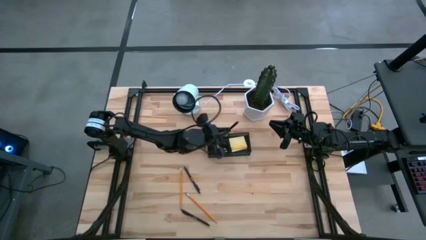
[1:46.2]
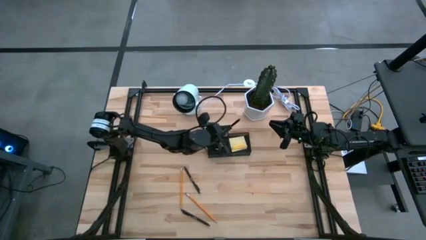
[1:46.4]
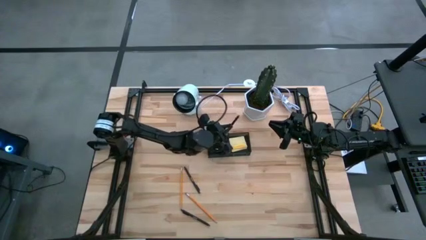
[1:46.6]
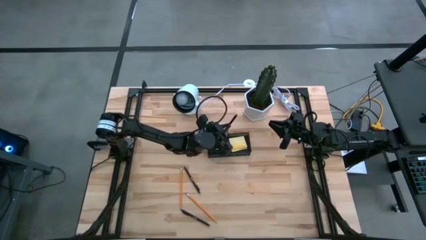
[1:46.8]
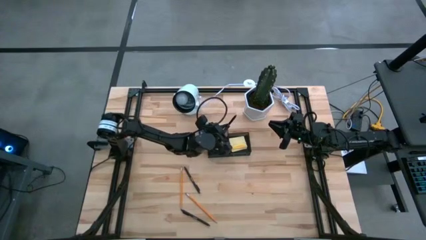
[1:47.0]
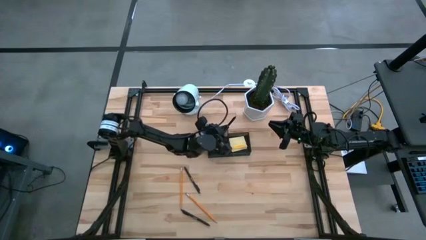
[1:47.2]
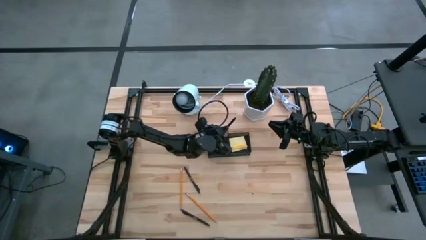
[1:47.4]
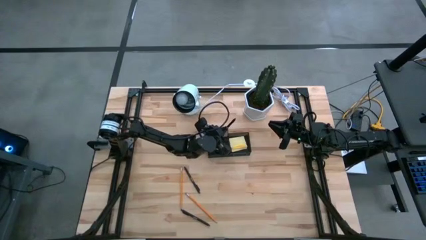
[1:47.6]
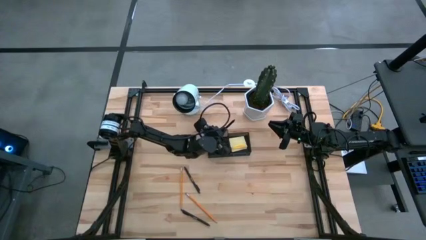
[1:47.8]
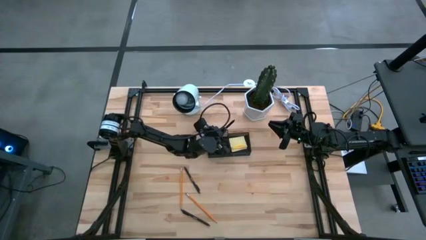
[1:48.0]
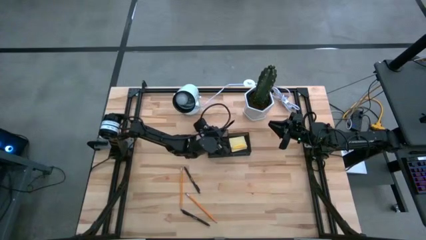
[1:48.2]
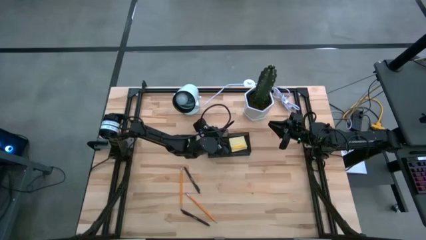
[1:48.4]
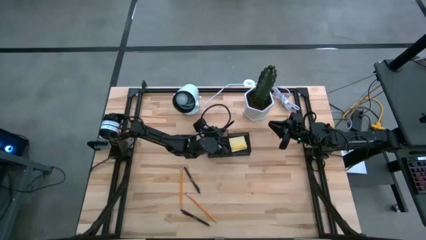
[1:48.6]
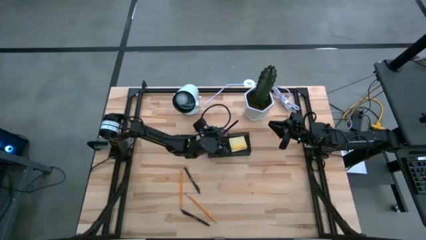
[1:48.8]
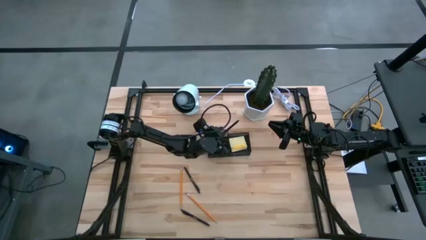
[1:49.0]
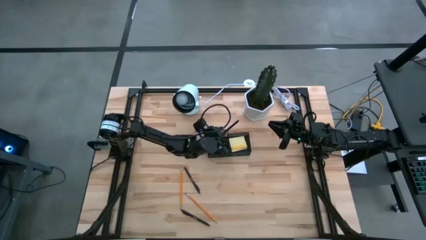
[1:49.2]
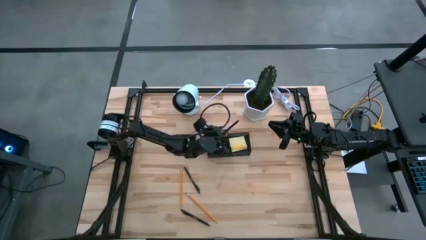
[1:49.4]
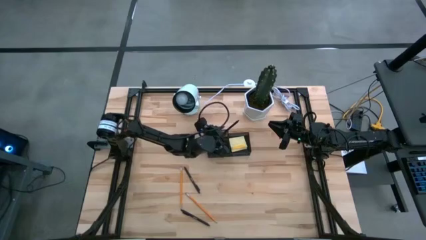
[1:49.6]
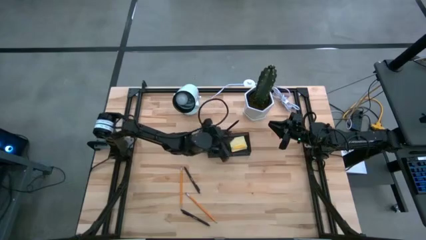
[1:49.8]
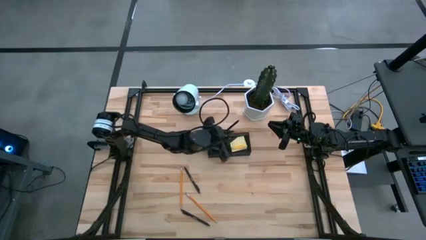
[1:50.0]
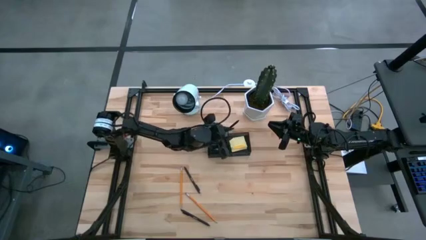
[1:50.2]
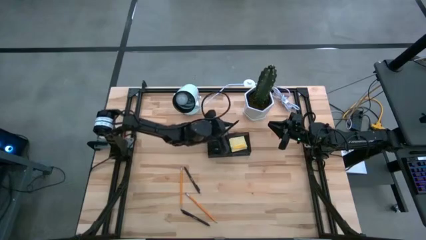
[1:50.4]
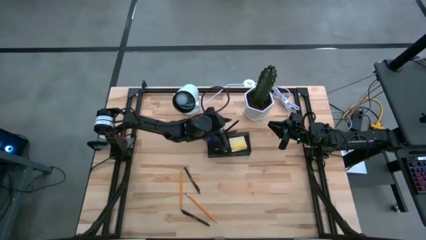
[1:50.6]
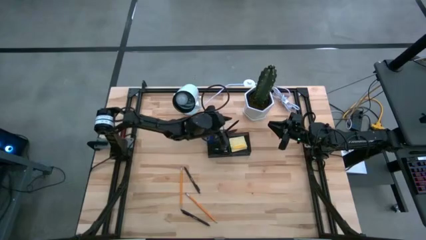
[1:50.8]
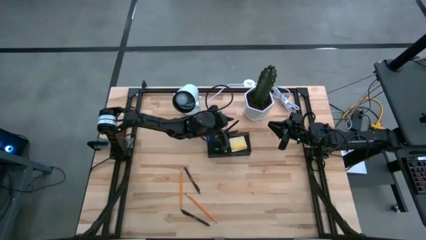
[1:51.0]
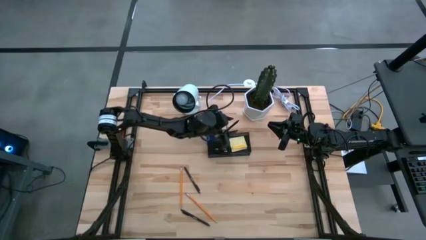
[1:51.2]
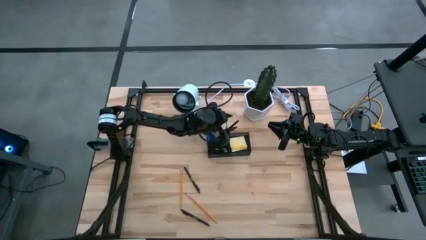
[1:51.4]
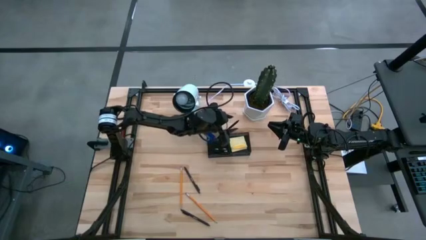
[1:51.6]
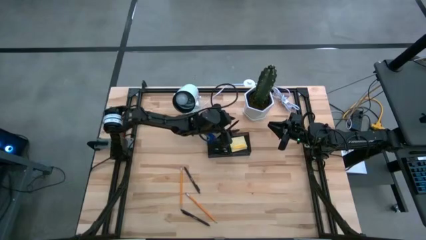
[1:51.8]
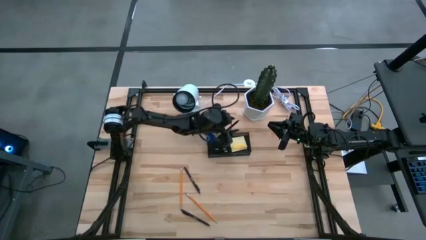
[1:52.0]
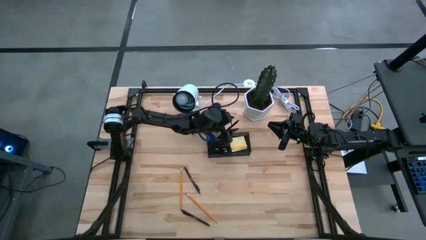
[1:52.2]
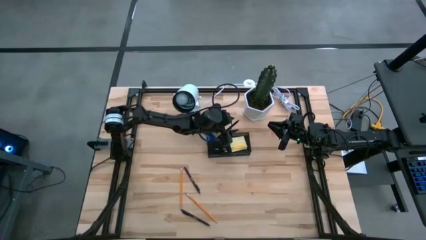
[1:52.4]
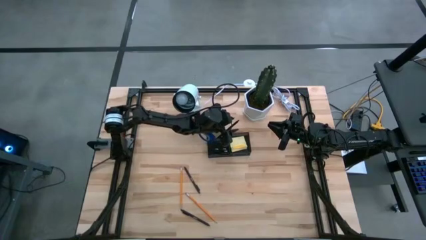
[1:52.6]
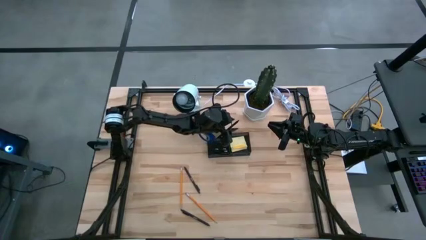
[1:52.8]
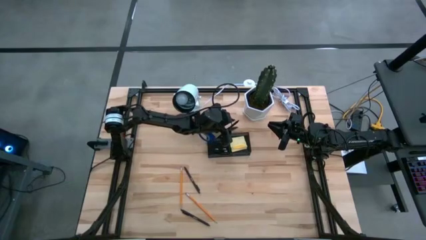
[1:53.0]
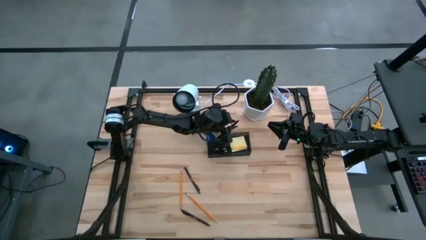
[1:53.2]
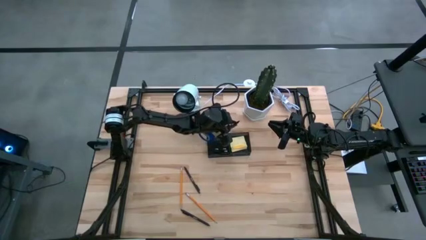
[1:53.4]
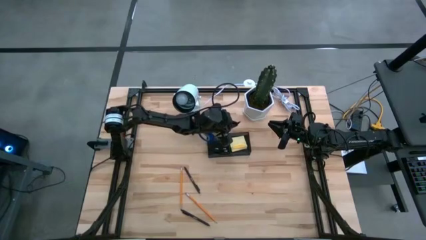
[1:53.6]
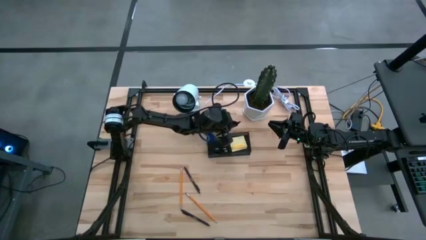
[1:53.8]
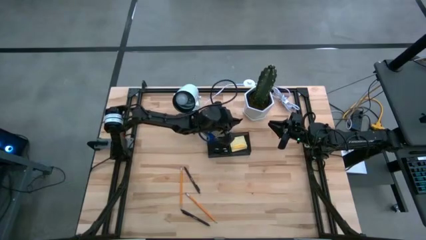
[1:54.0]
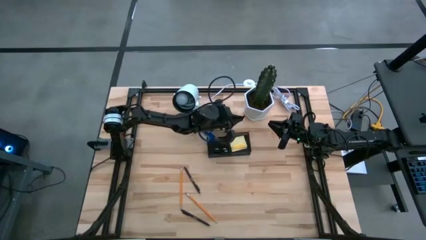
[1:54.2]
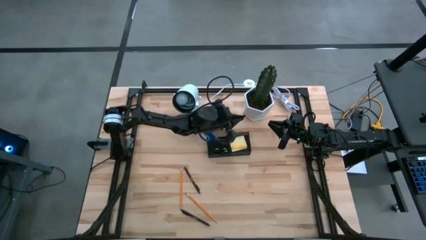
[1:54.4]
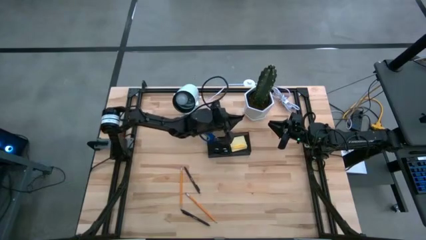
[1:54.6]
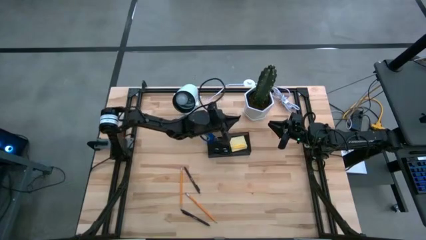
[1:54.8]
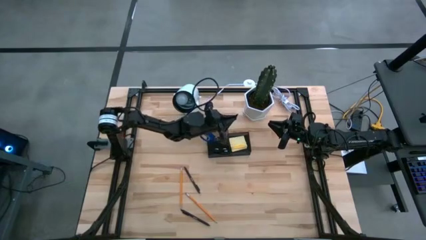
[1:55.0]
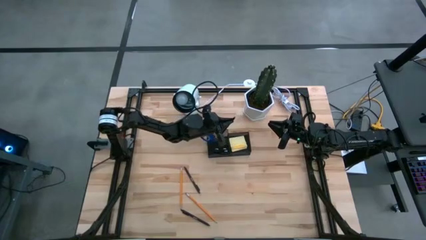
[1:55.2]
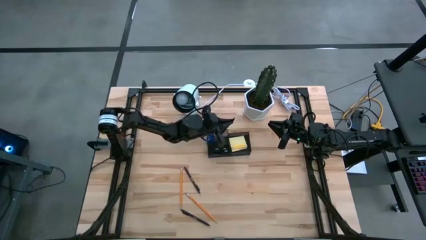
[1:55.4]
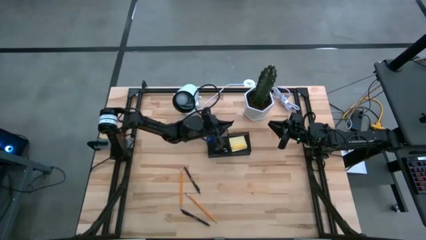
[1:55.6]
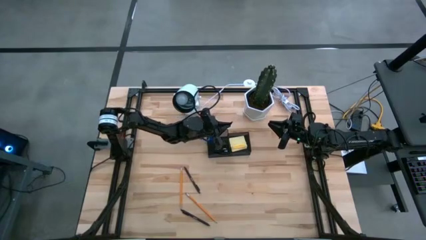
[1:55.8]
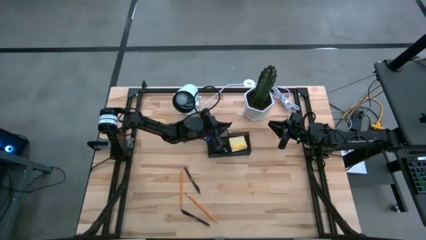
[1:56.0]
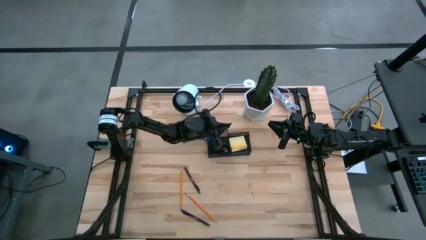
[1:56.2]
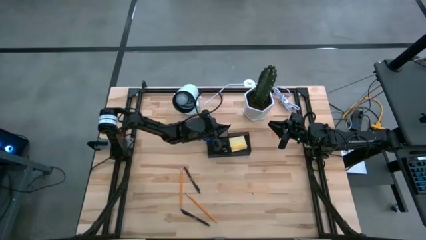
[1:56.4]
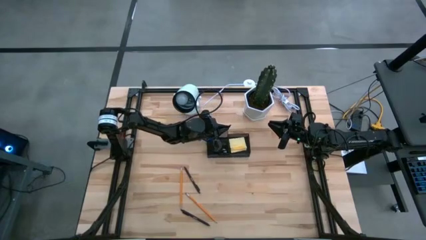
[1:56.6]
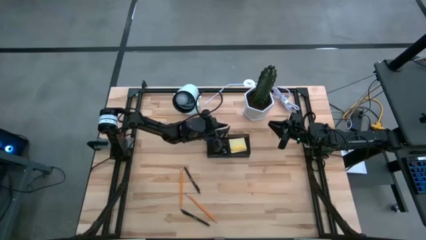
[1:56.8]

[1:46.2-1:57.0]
Task: Pick and place office supplies into organizer
Put the top left black pen into the black desk organizer
